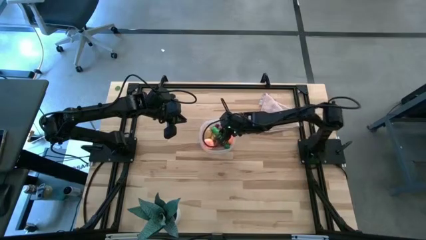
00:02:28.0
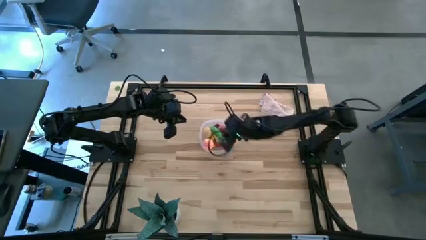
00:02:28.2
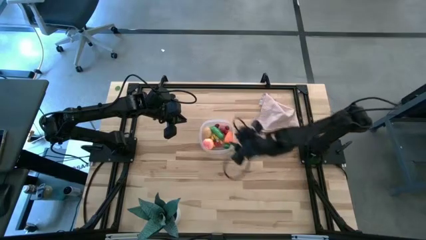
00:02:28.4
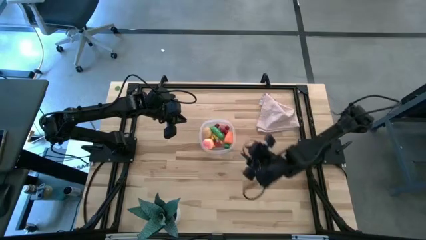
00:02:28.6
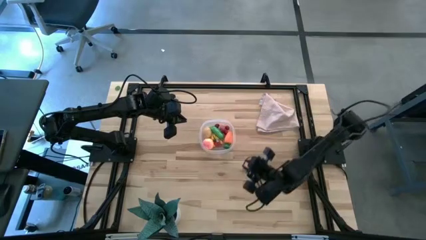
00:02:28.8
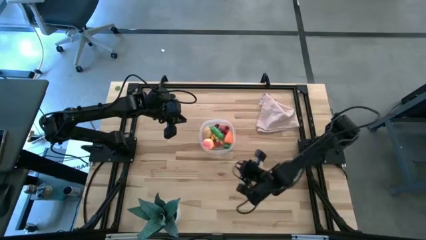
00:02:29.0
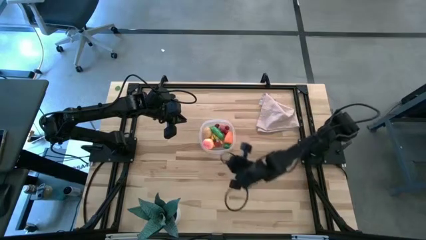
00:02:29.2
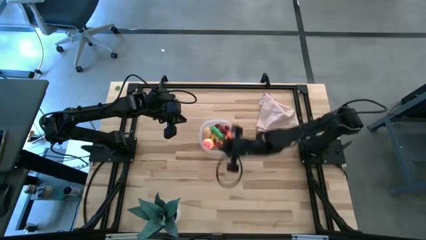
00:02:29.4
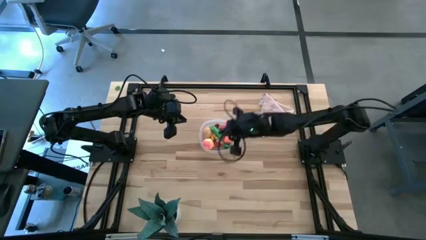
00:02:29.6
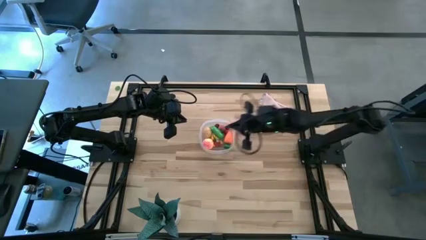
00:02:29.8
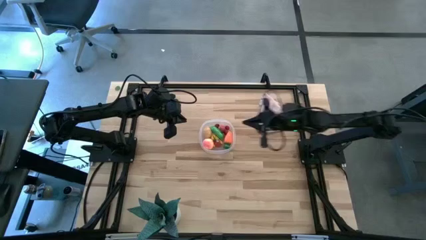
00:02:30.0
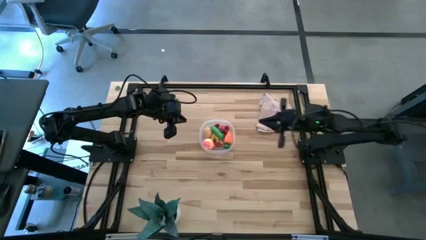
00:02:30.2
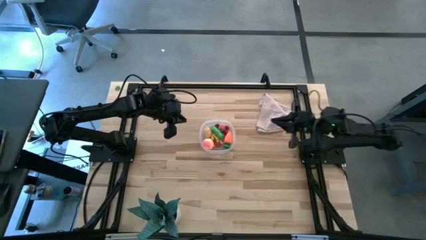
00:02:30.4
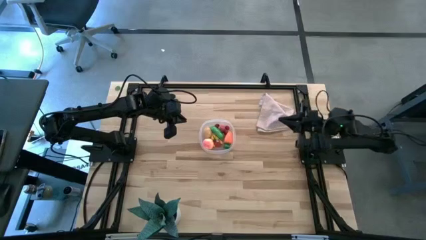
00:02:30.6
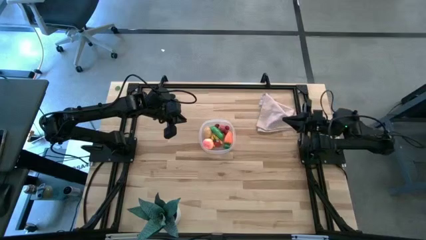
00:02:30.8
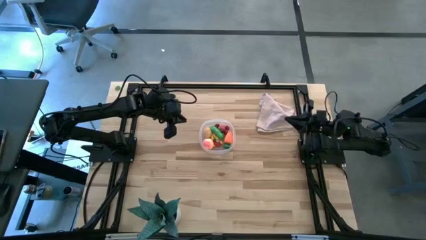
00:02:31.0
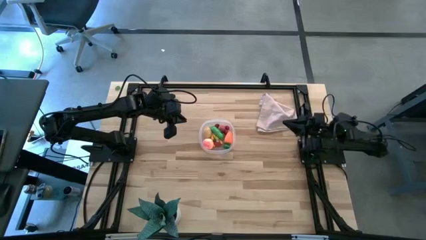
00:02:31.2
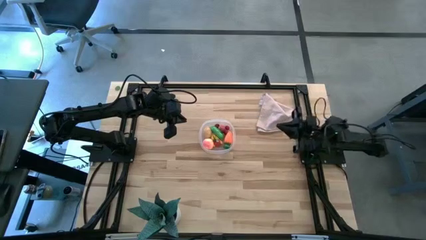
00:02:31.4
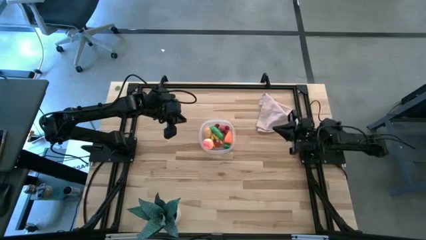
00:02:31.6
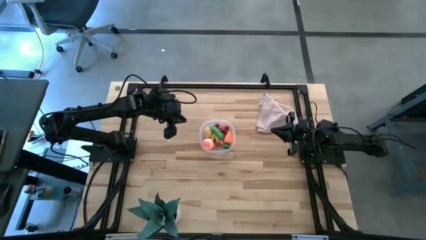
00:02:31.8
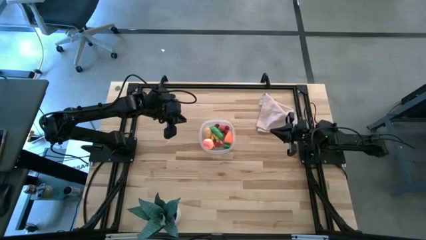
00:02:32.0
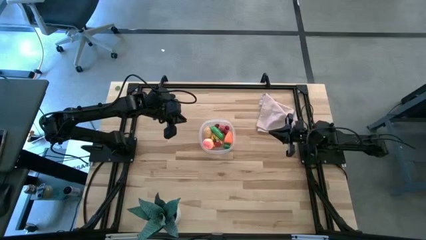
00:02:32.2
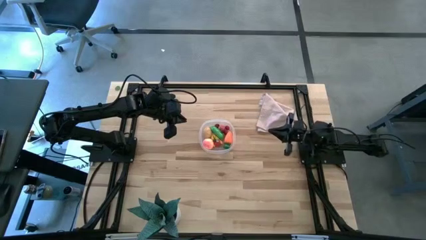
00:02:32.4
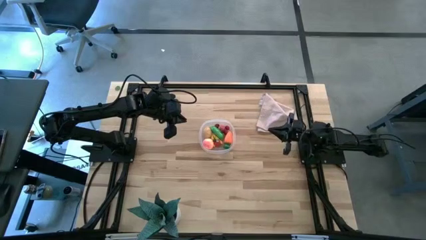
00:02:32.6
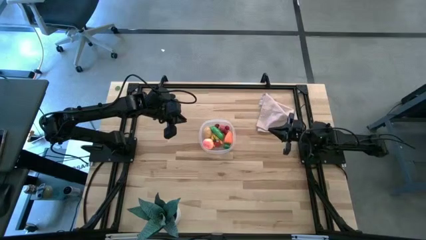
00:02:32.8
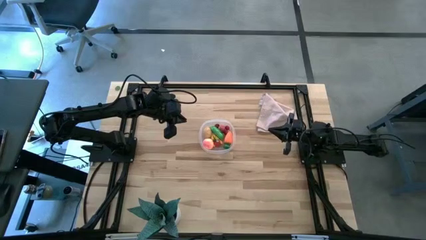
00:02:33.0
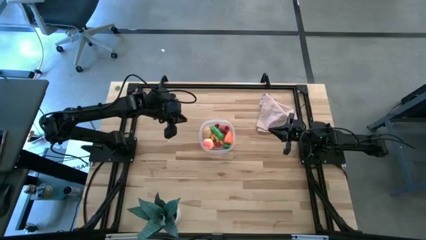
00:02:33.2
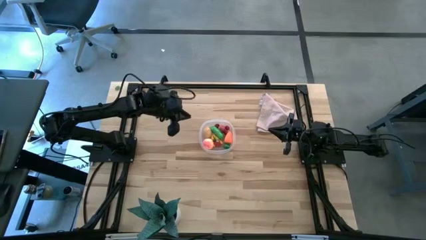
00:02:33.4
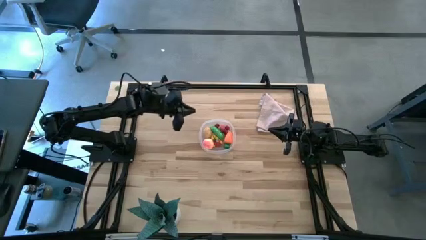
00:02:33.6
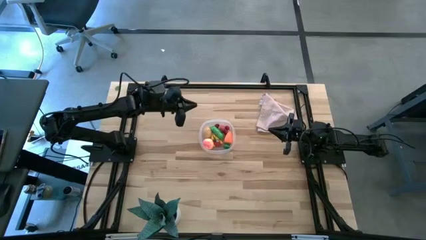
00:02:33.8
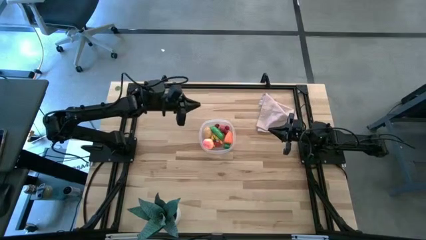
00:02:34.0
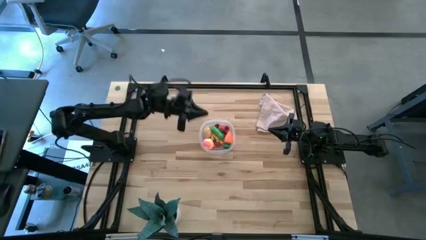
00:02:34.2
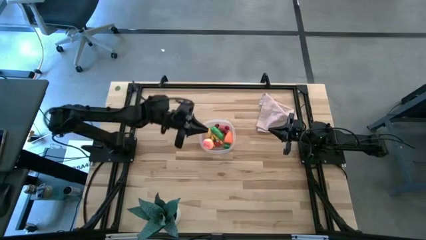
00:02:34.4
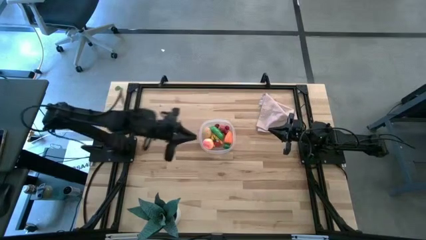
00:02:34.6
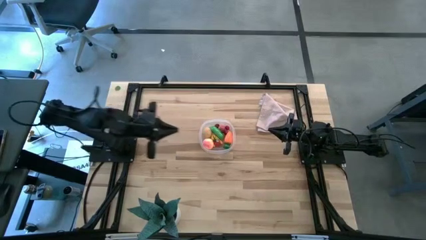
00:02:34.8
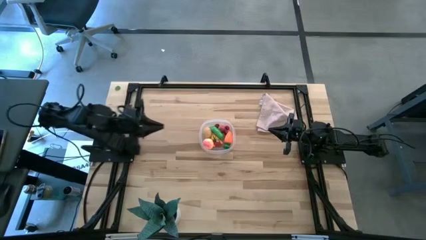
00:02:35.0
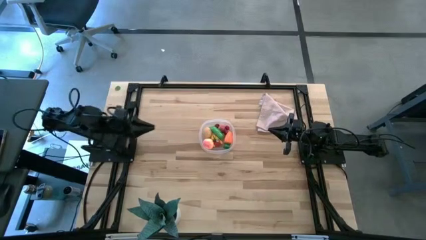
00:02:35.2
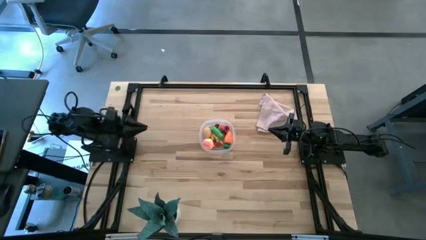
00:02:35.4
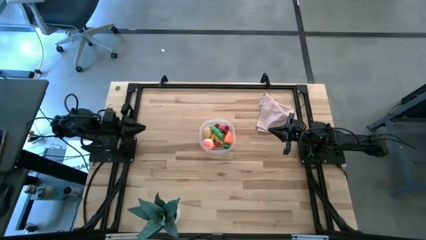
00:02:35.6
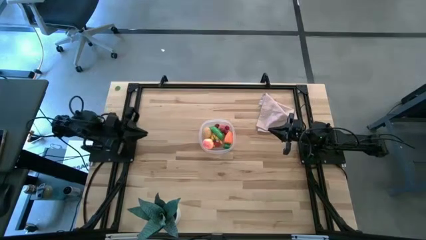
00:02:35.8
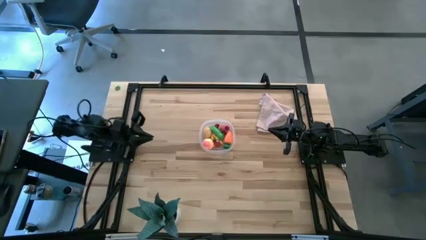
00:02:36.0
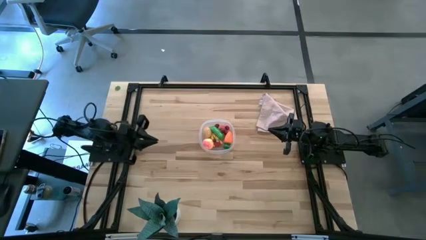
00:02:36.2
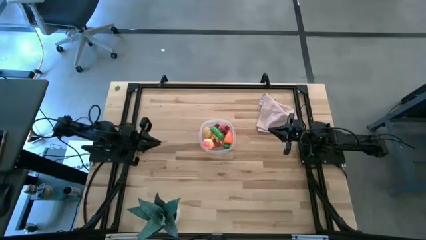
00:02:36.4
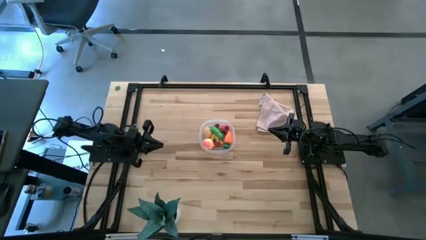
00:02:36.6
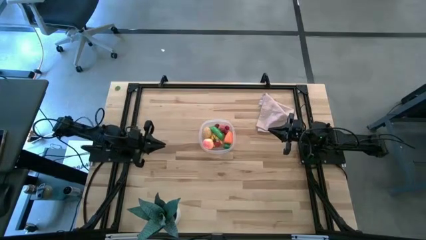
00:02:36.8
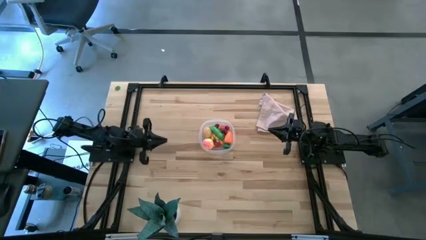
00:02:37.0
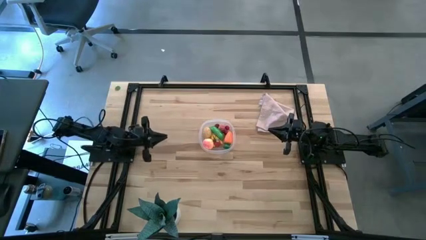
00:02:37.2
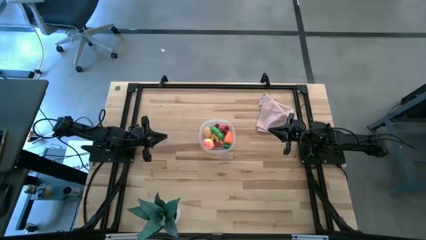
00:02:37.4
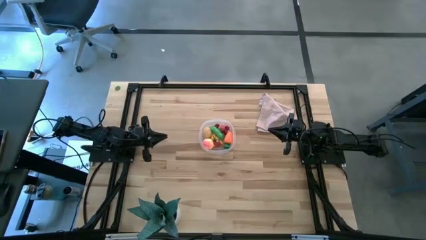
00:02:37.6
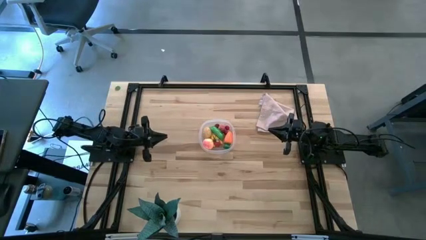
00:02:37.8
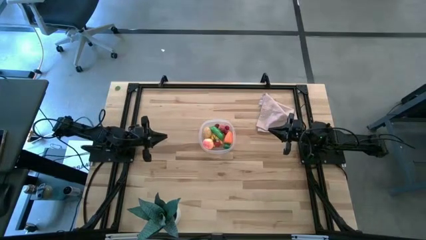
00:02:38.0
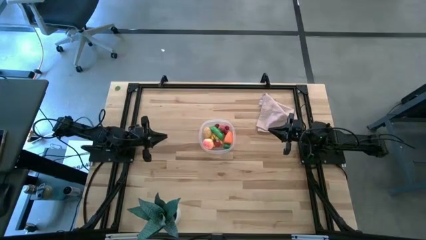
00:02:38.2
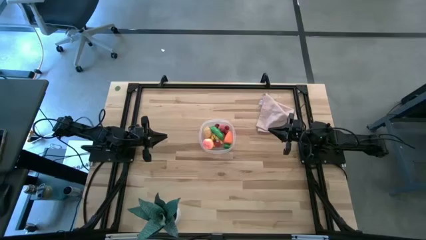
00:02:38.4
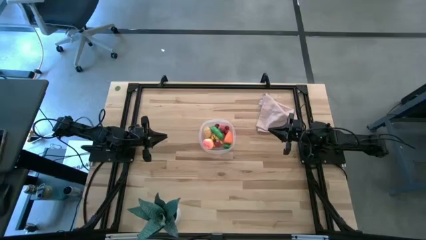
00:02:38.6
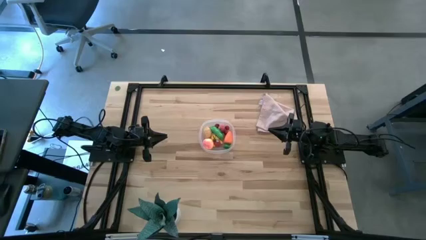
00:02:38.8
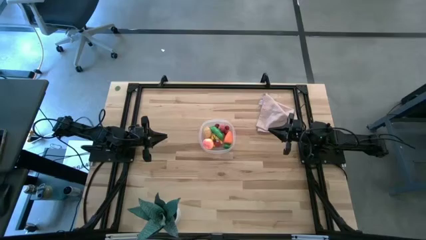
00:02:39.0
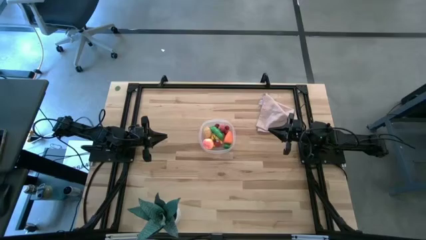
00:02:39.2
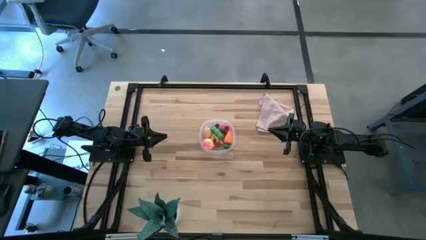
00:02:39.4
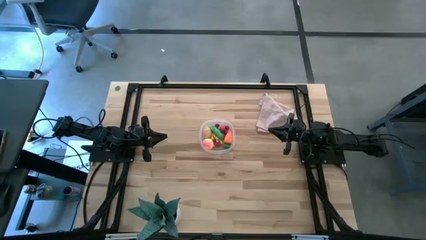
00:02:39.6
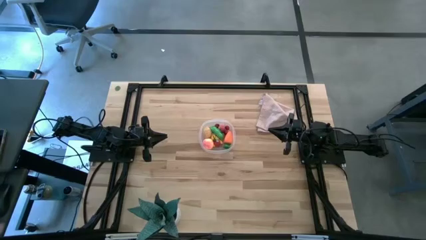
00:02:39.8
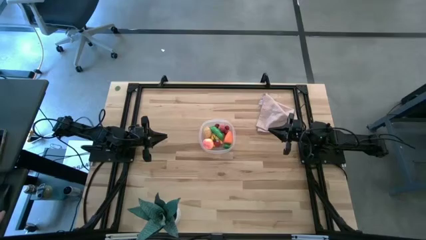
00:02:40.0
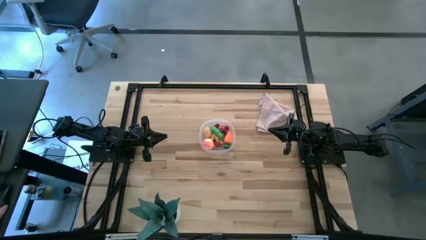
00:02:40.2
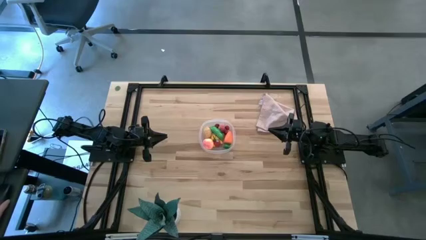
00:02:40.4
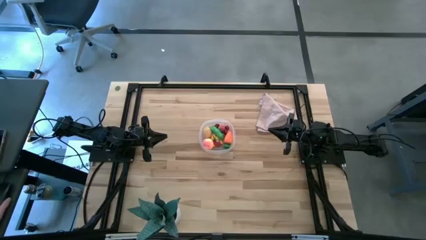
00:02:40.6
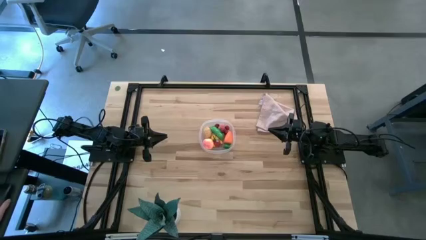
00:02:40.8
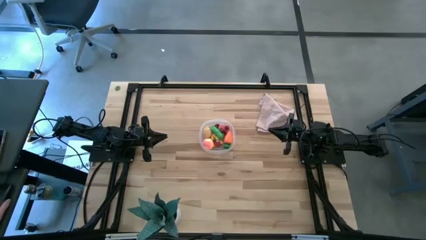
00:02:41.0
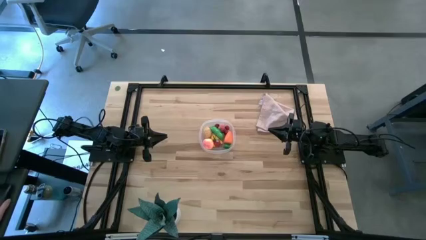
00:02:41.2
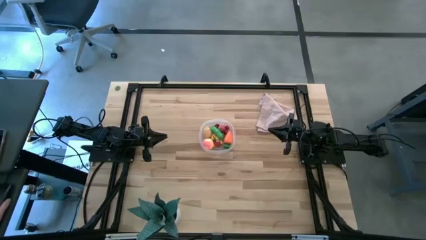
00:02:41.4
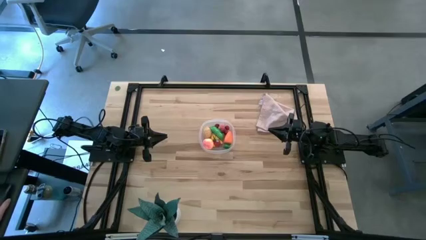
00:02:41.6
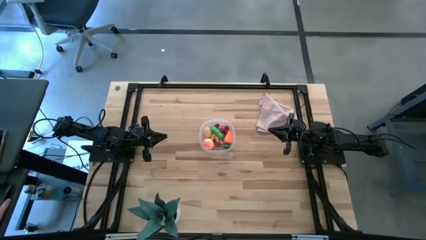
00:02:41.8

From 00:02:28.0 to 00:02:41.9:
Task: Pick and placing Produce into tupperware
Return to Home Position

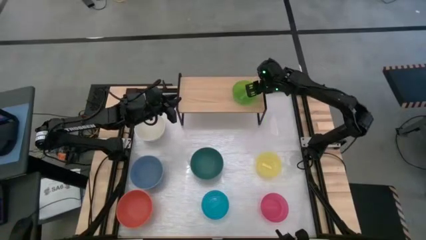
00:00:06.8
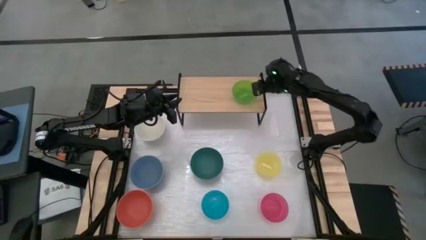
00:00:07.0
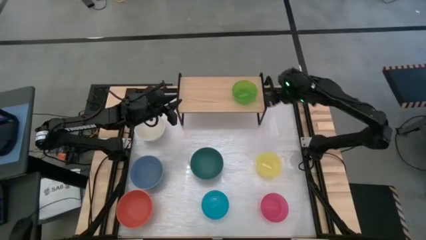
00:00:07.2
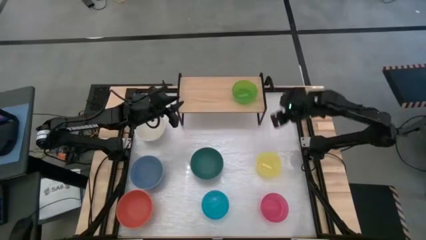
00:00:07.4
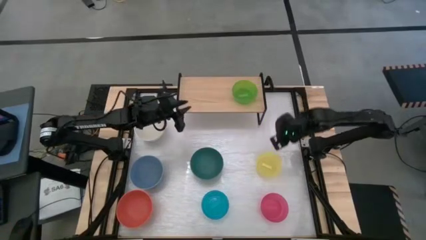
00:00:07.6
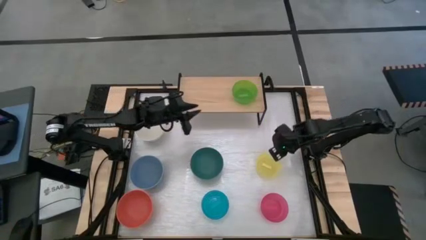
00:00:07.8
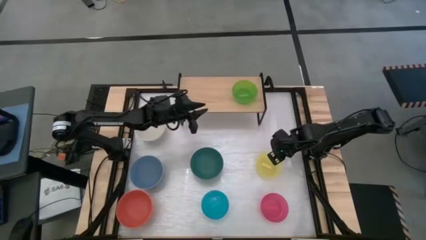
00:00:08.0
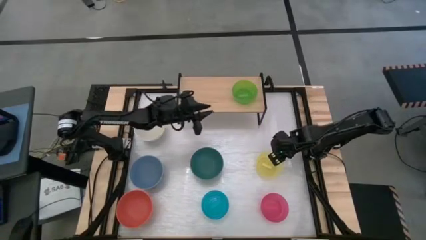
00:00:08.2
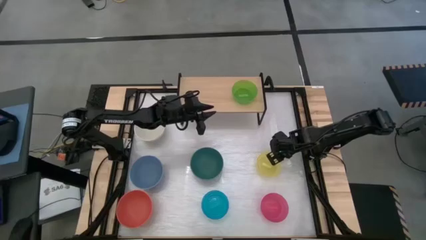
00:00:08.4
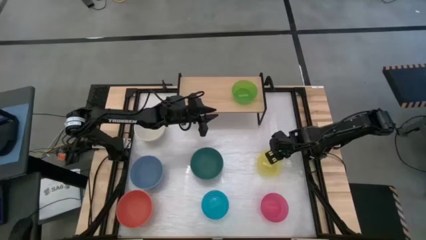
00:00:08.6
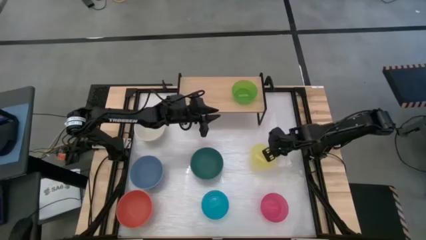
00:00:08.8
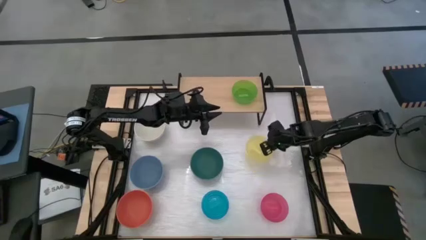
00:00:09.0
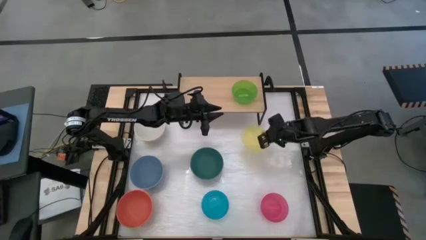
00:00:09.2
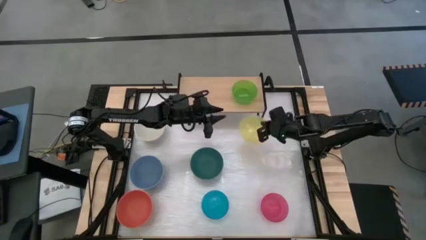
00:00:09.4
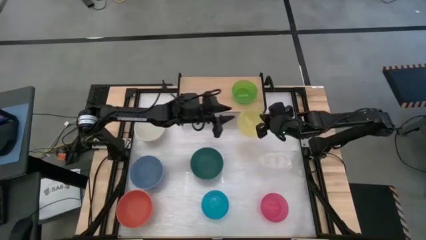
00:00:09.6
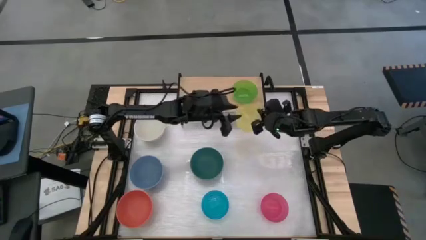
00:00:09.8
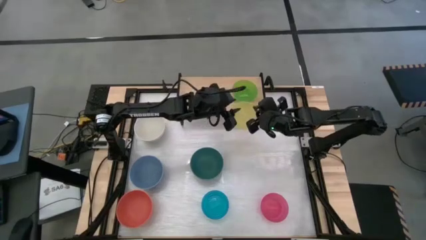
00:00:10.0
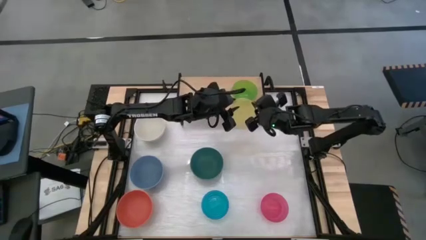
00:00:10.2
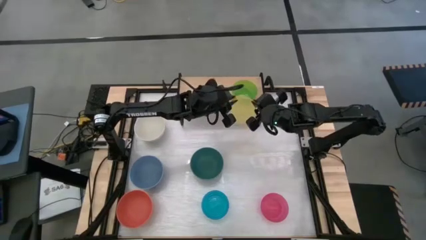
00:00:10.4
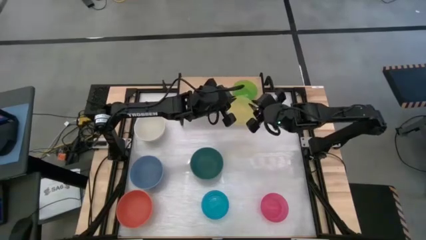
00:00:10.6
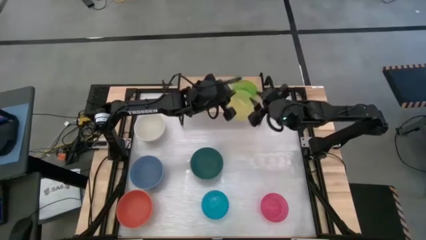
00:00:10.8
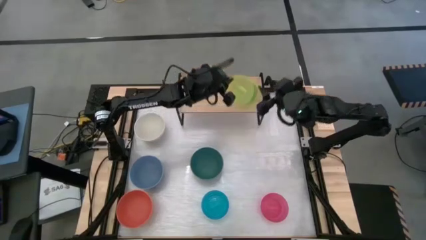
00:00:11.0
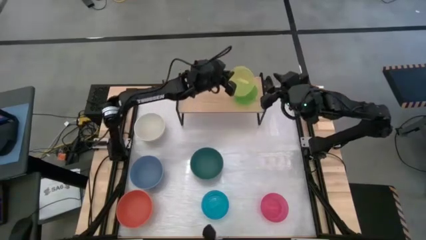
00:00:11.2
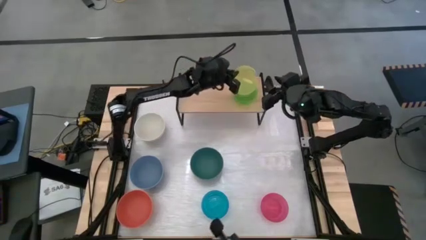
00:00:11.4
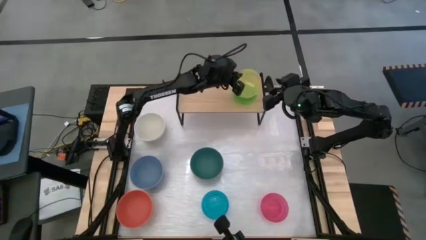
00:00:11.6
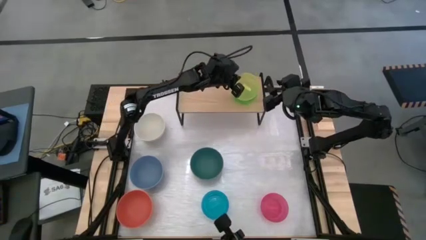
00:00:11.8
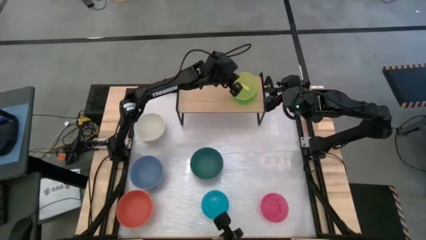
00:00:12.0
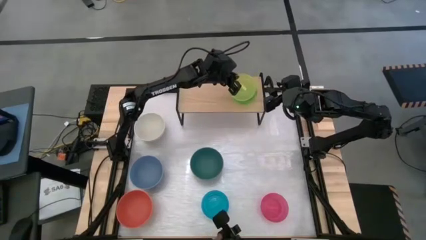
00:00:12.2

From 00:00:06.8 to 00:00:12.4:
Task: Place and stack bowls onto a shelf
Stack the small yellow bowl on top of the small green bowl on the shelf
